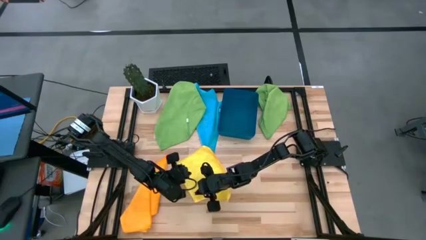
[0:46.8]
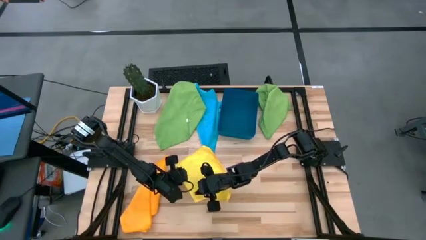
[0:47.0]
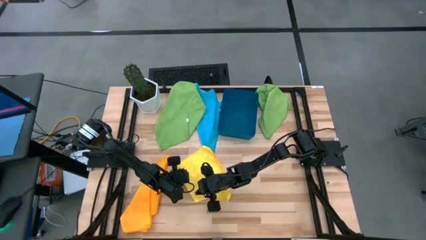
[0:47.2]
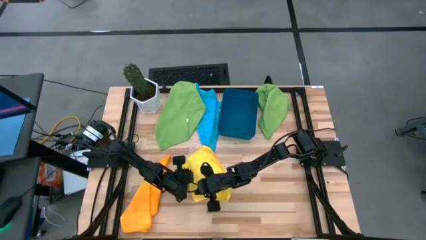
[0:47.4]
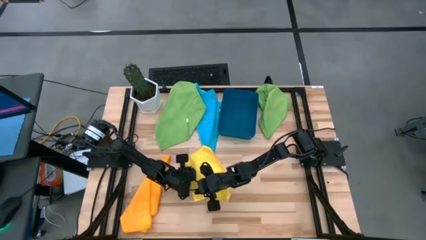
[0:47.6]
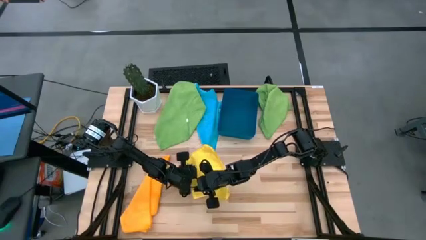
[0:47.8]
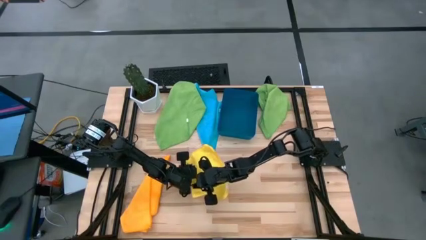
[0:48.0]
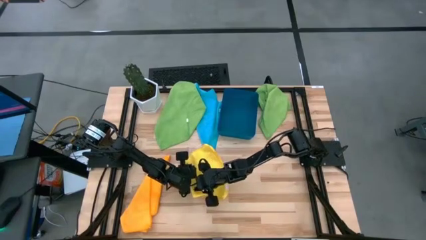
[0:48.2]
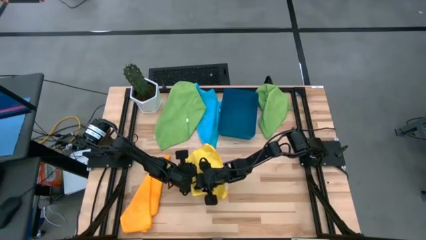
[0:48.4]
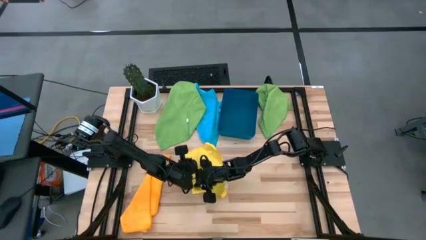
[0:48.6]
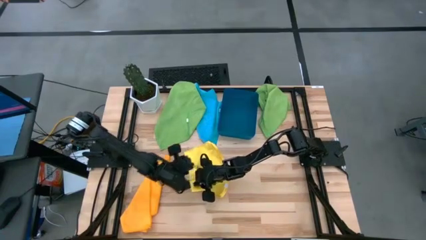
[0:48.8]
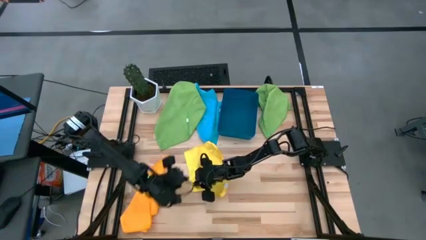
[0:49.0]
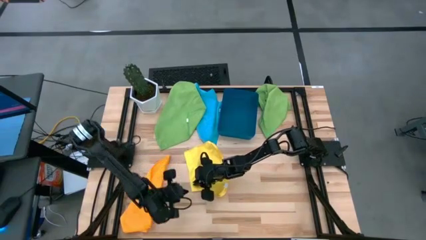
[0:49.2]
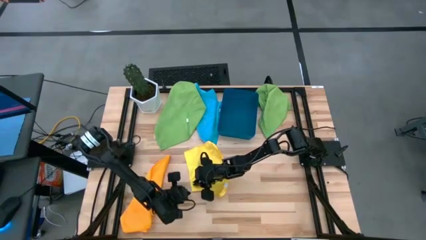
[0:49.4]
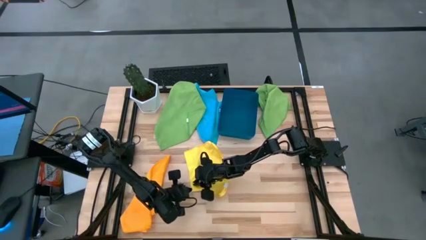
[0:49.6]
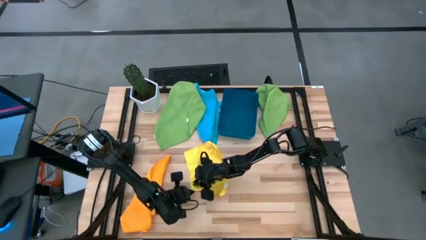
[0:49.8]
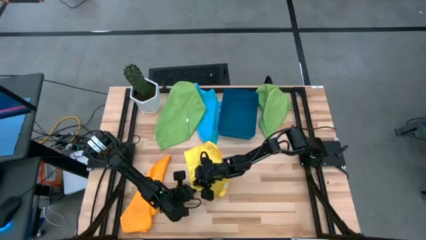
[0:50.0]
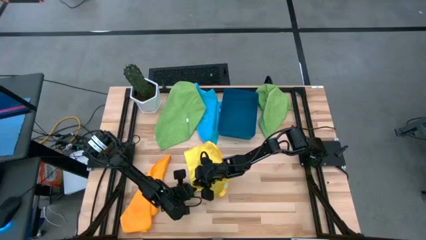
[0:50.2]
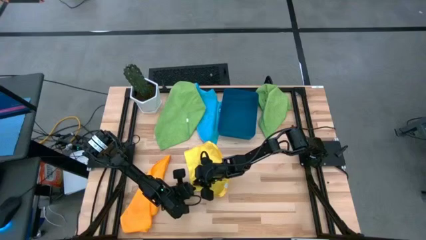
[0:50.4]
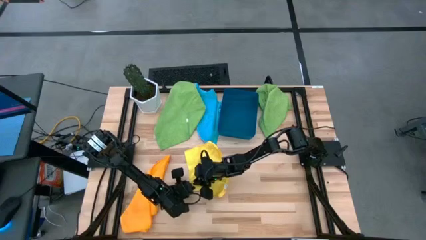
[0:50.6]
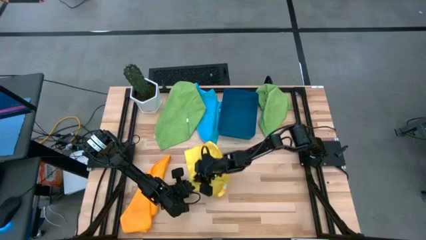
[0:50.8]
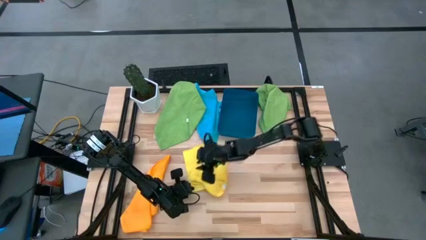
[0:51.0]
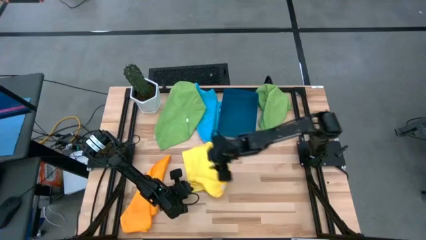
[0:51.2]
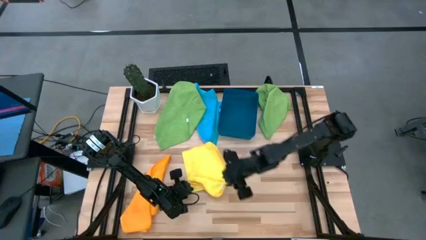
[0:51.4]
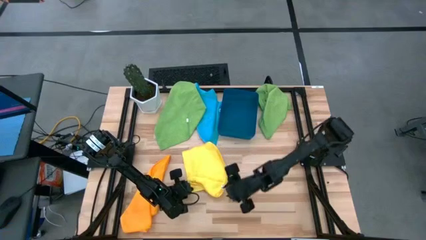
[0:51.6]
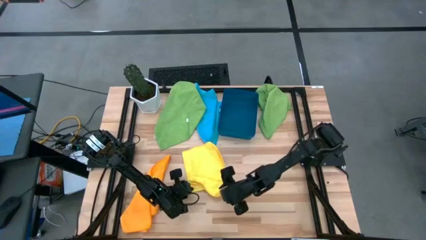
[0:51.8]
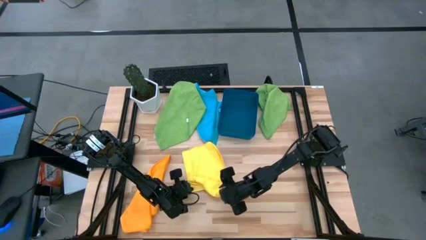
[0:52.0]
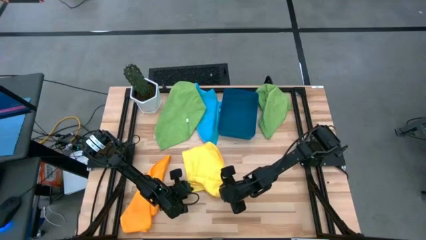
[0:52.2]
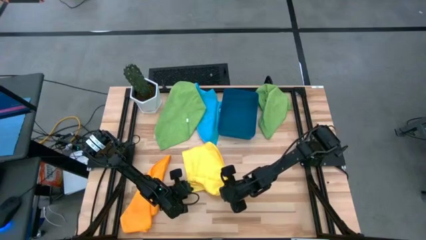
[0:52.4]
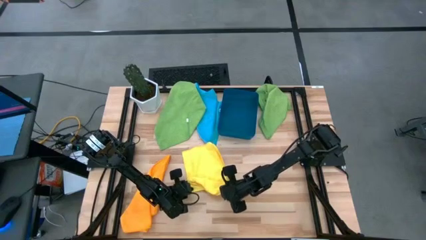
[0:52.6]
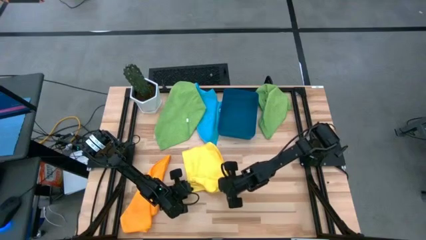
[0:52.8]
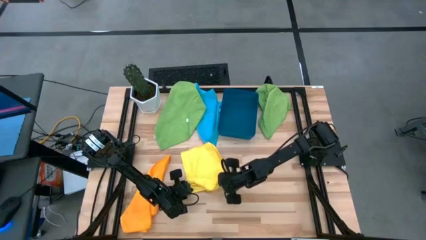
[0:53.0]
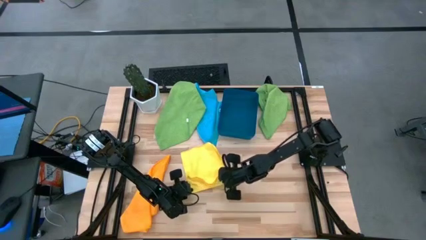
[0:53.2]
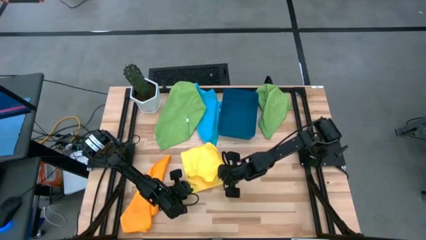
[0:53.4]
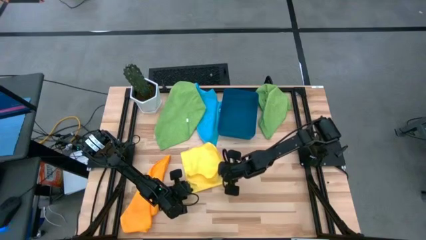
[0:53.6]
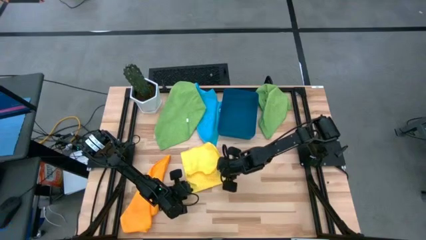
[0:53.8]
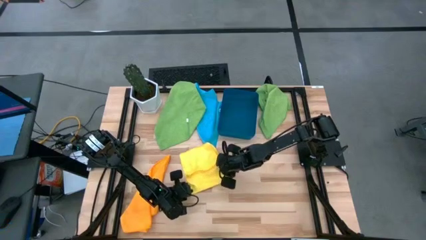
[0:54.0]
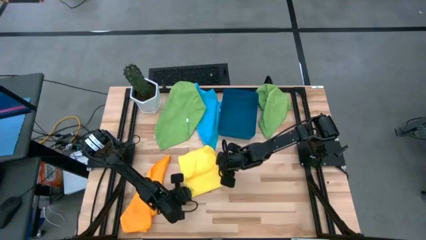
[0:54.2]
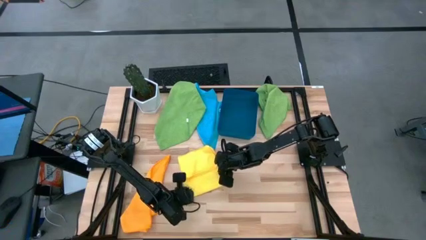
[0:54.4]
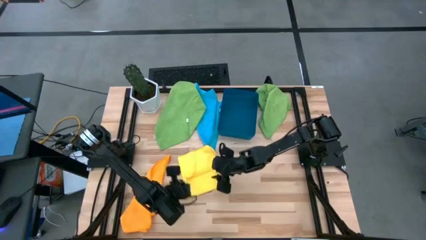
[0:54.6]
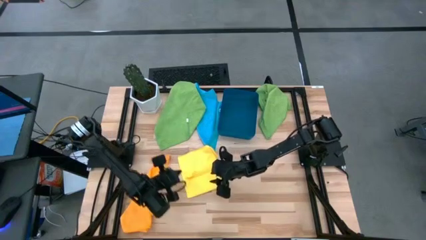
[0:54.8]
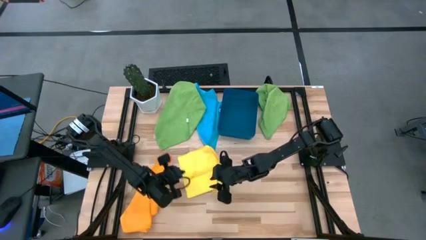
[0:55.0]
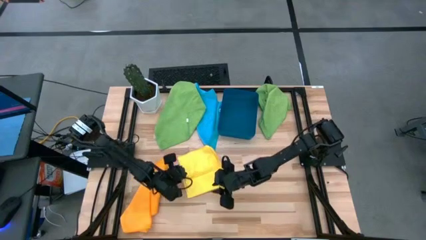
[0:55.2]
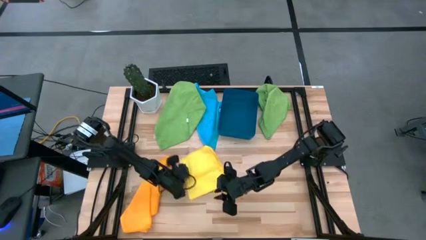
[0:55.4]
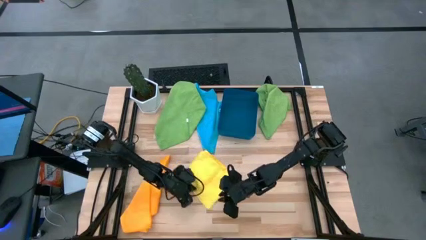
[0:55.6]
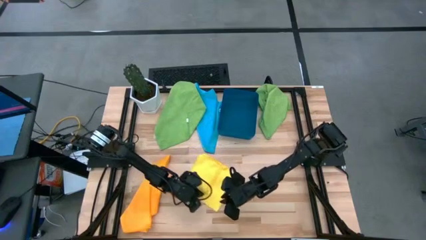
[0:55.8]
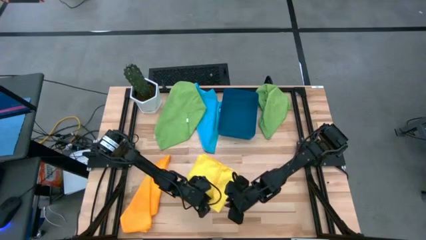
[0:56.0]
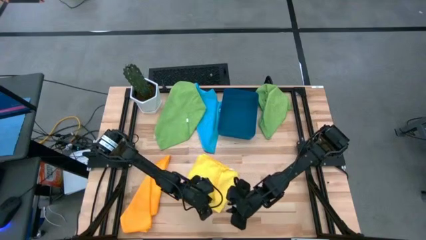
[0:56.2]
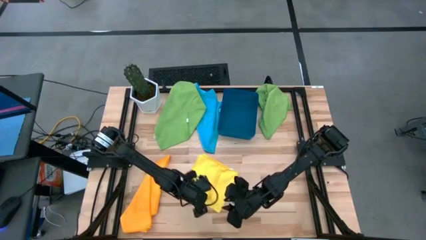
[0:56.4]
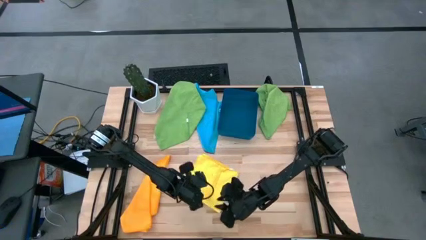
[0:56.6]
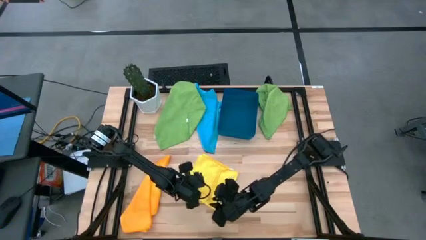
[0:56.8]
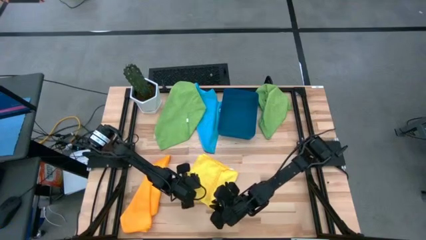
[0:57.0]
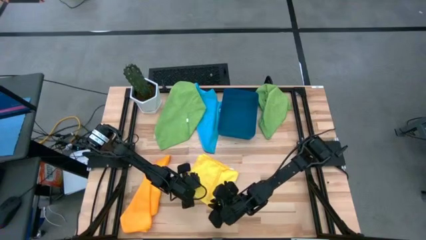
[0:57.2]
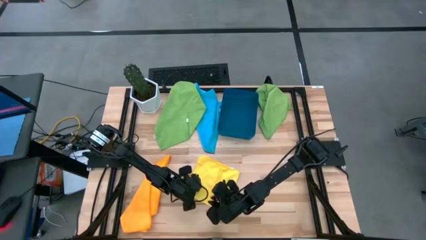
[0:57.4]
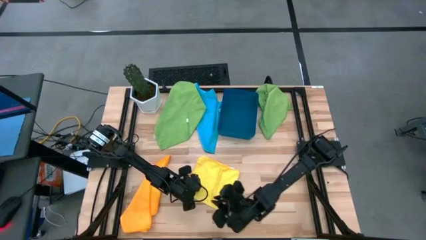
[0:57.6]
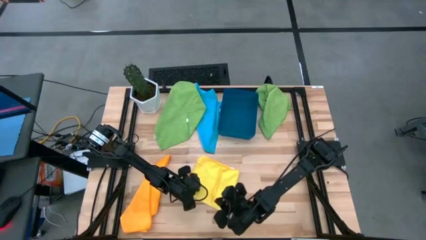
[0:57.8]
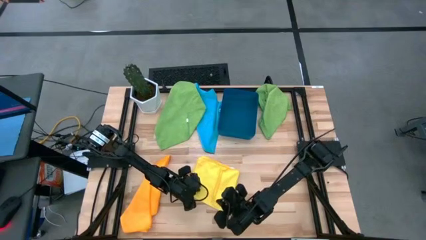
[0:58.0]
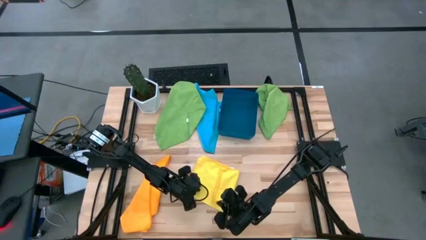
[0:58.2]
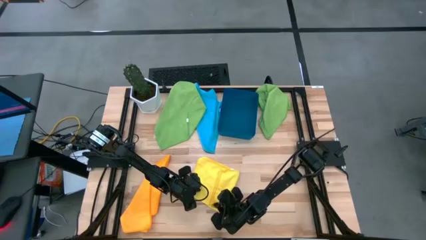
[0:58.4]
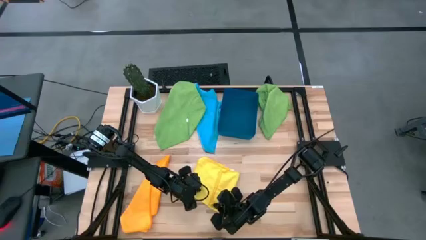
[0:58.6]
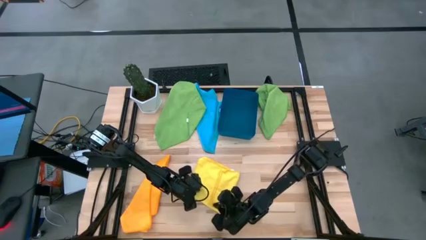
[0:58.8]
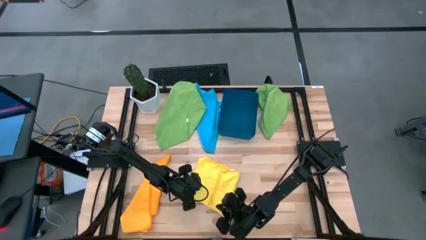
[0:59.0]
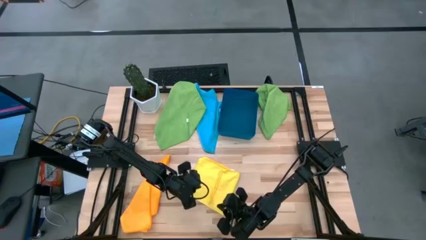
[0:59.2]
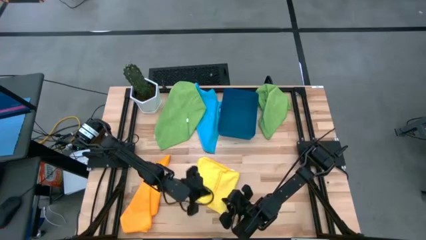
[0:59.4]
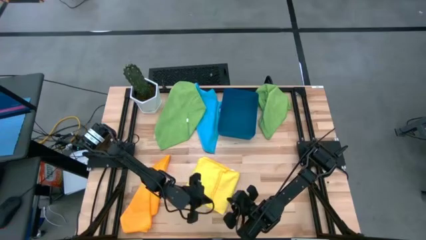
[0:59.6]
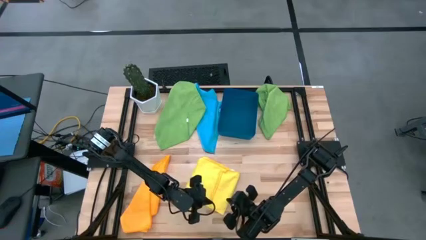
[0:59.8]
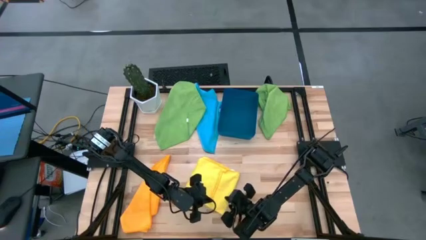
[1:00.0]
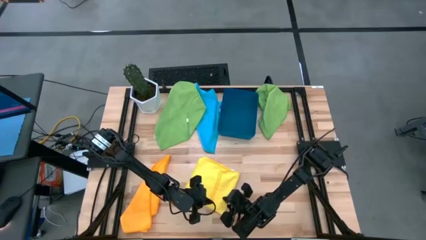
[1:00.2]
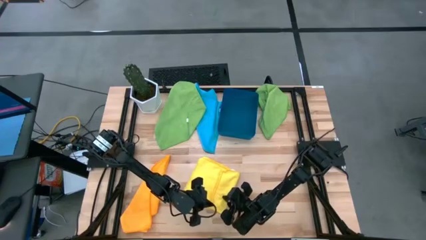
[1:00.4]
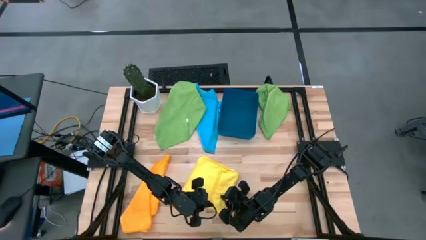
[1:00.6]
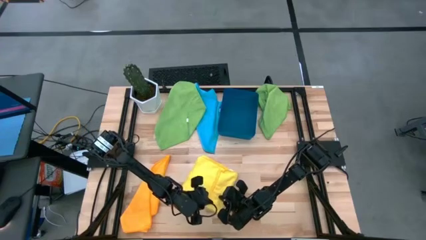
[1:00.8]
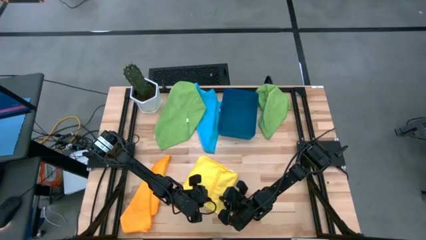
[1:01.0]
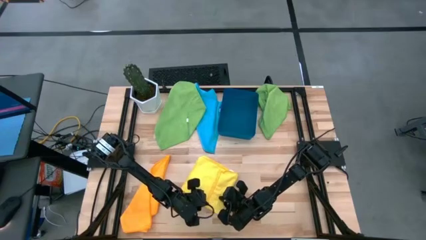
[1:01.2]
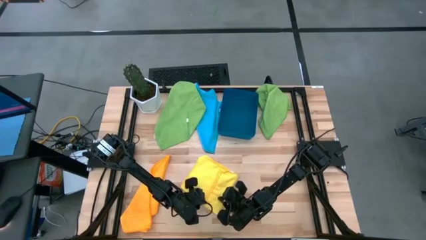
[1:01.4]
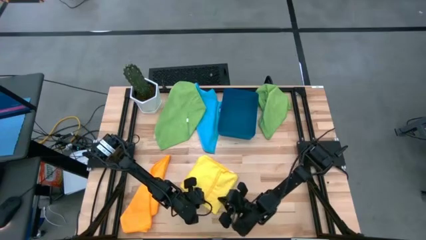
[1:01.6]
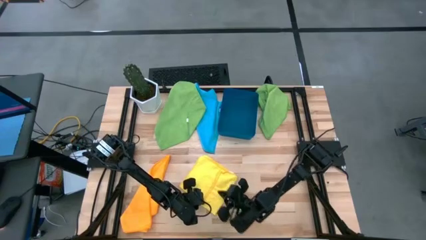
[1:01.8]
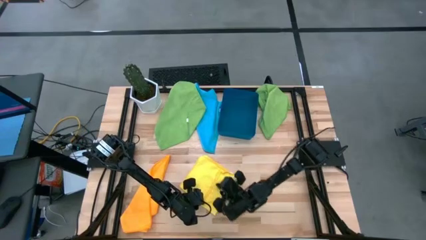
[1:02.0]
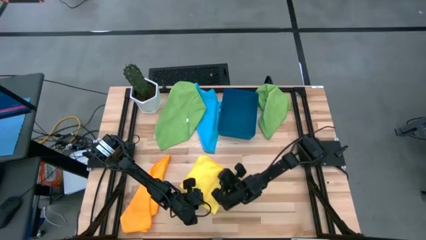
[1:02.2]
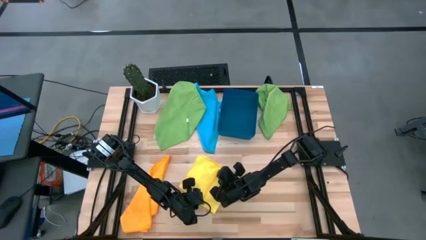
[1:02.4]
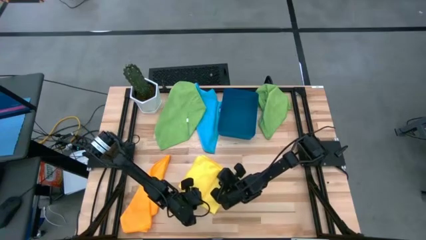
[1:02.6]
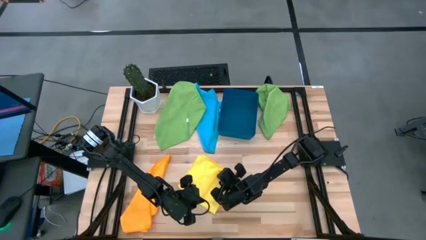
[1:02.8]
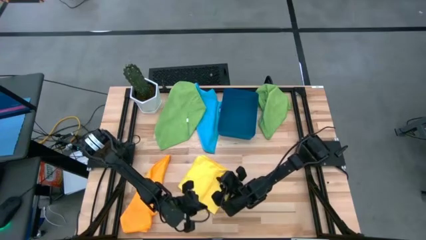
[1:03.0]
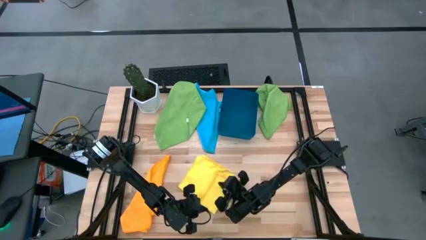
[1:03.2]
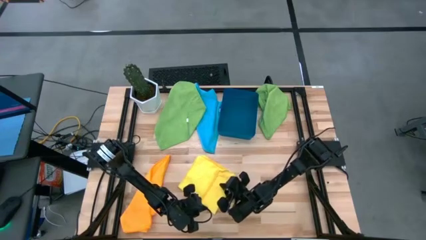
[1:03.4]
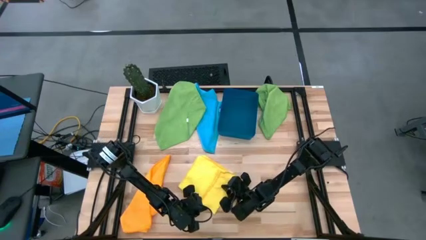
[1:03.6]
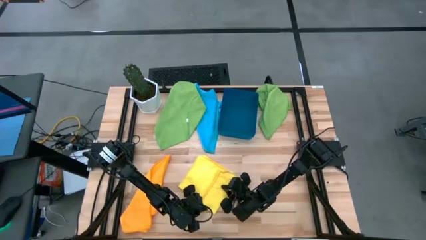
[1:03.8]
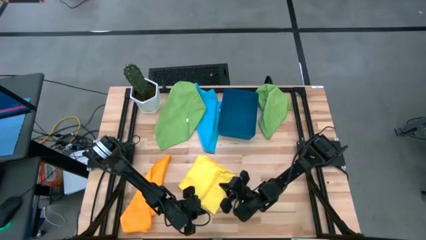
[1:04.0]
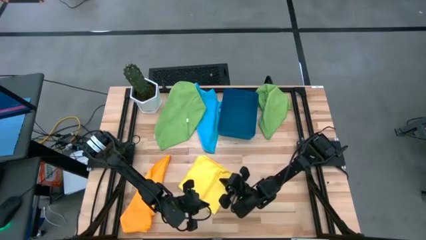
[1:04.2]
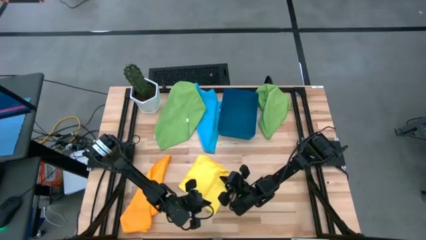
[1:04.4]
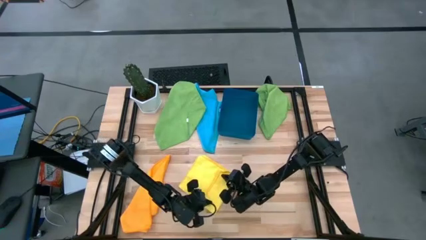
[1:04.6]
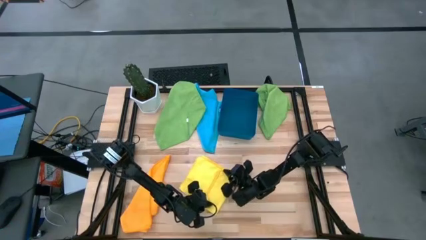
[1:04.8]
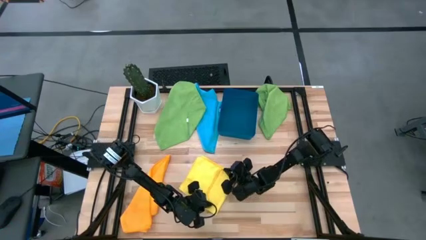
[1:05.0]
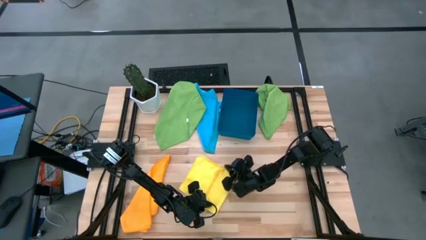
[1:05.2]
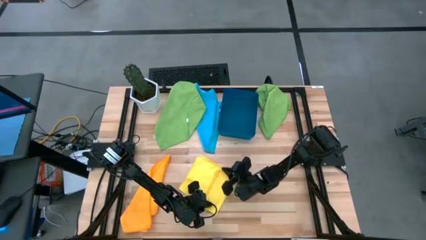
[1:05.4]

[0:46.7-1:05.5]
Task: Fold microfiber towels
Fold the yellow towel
